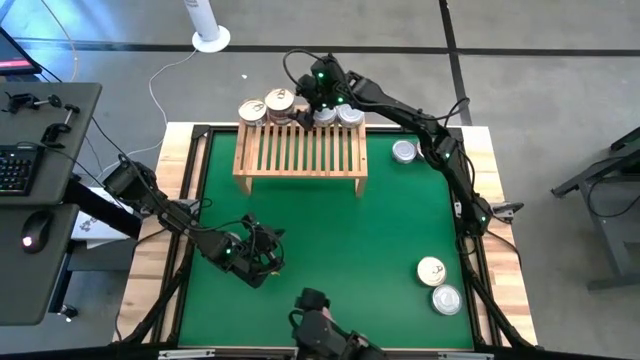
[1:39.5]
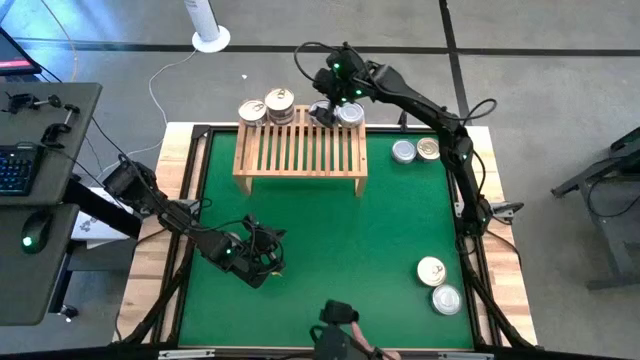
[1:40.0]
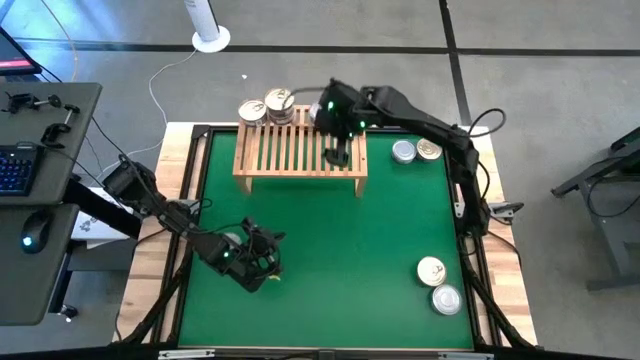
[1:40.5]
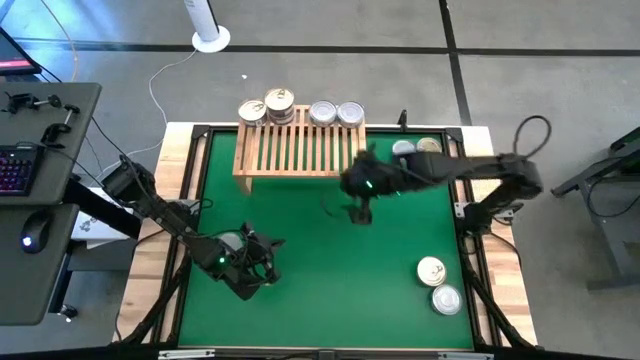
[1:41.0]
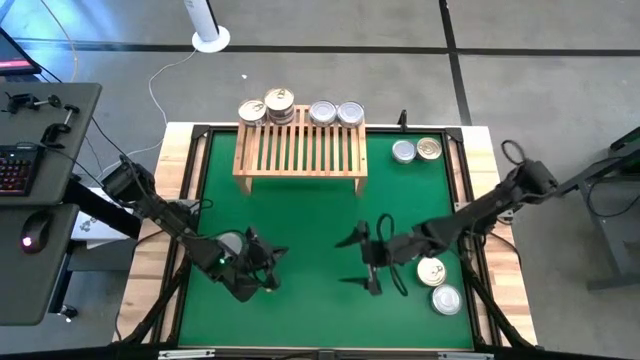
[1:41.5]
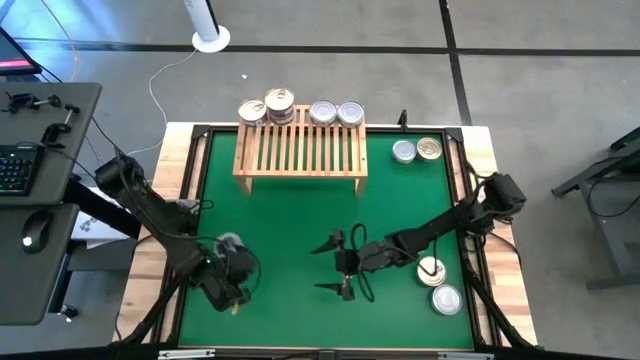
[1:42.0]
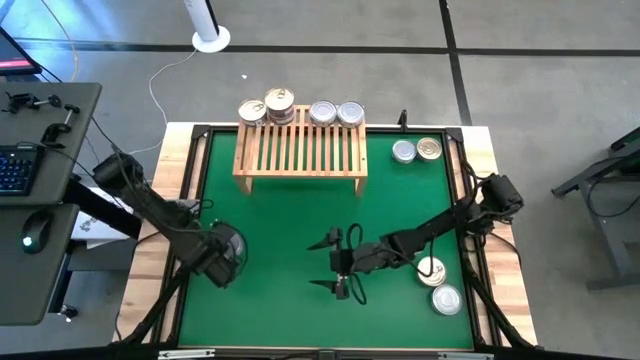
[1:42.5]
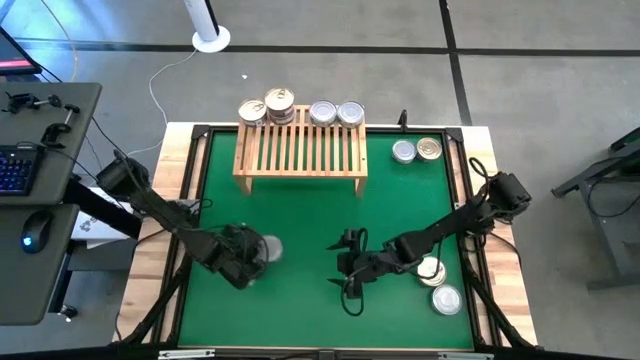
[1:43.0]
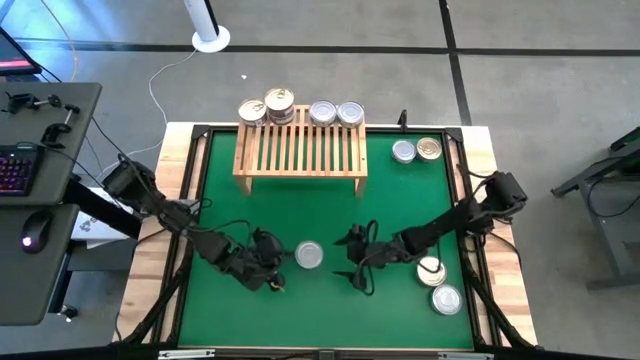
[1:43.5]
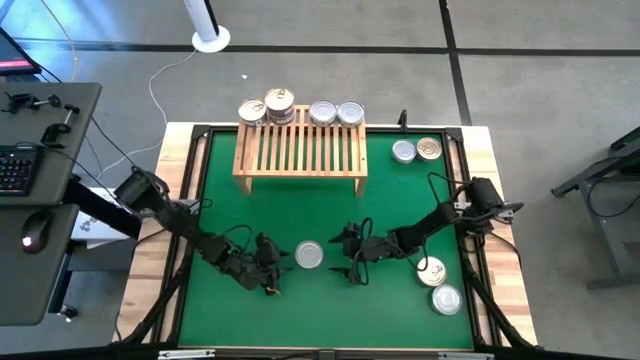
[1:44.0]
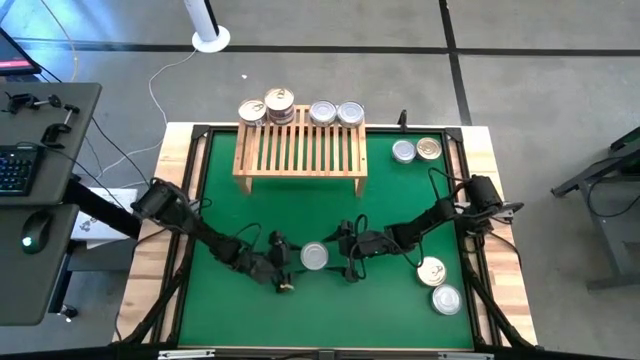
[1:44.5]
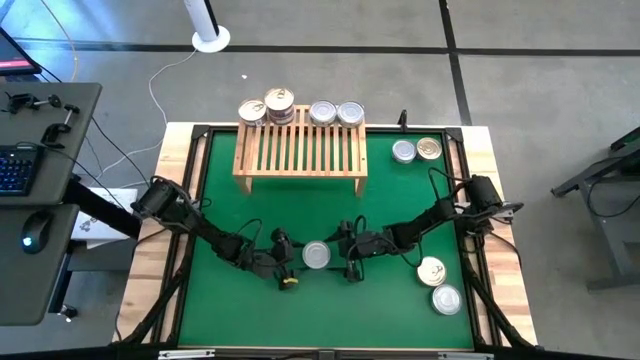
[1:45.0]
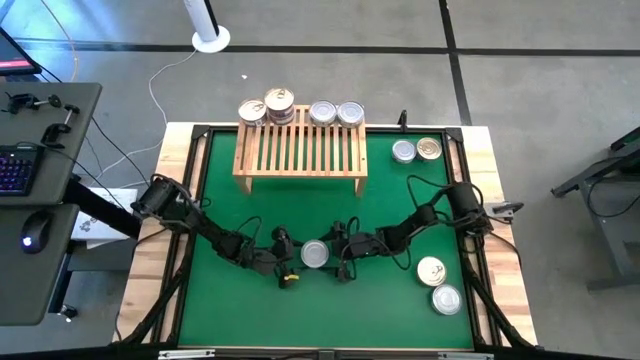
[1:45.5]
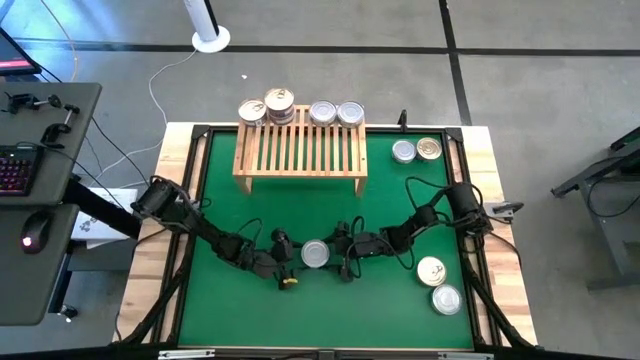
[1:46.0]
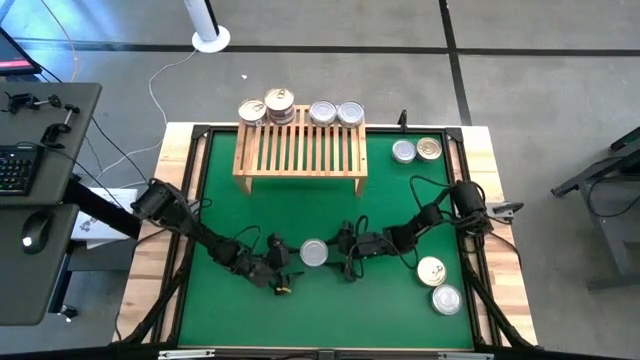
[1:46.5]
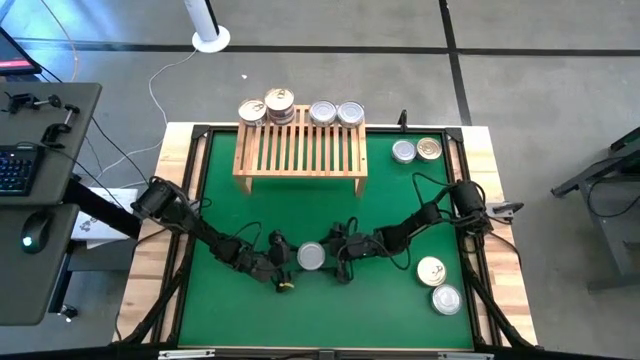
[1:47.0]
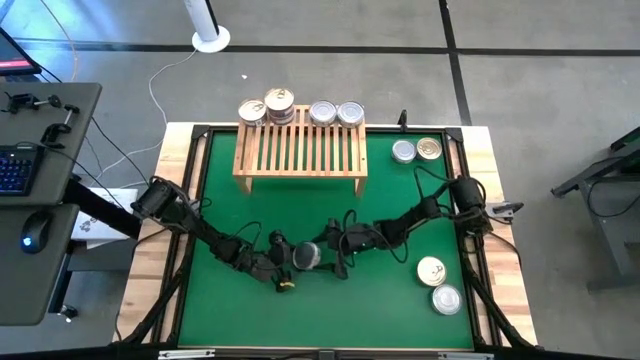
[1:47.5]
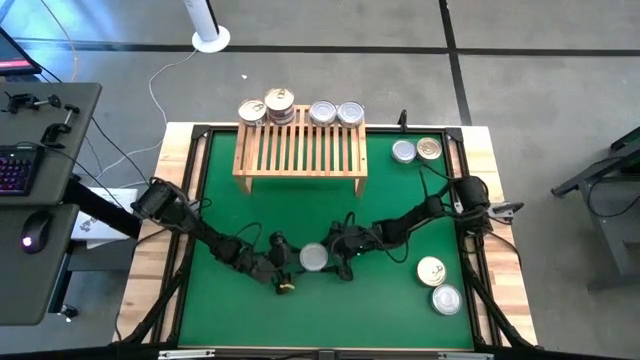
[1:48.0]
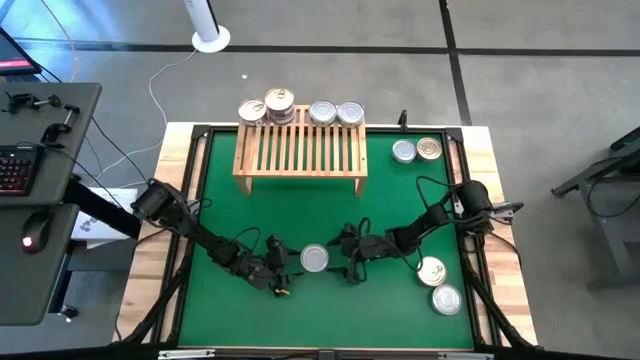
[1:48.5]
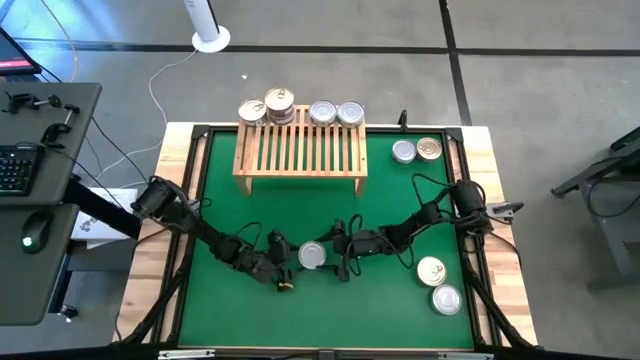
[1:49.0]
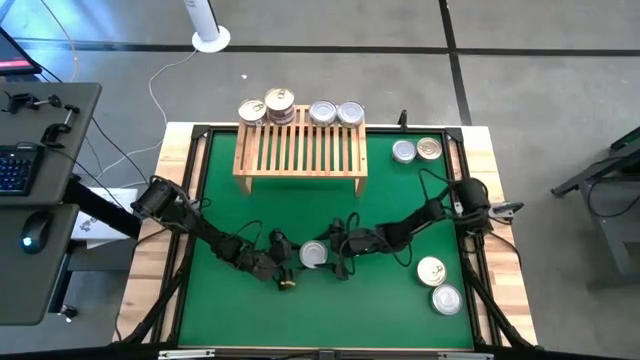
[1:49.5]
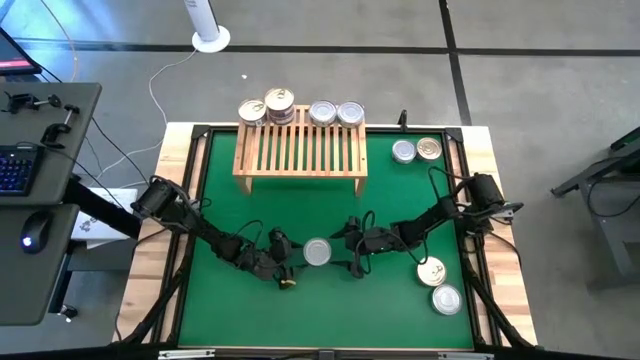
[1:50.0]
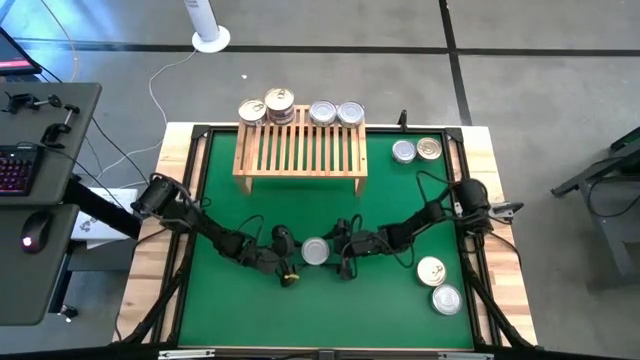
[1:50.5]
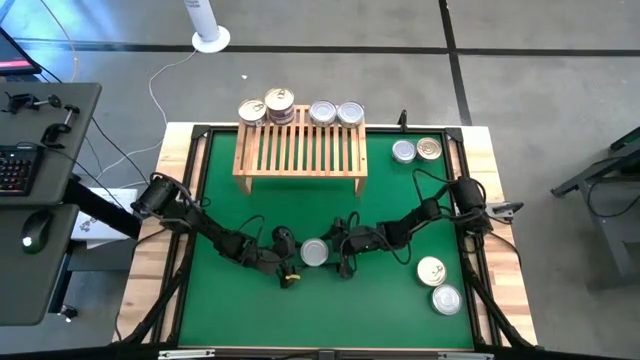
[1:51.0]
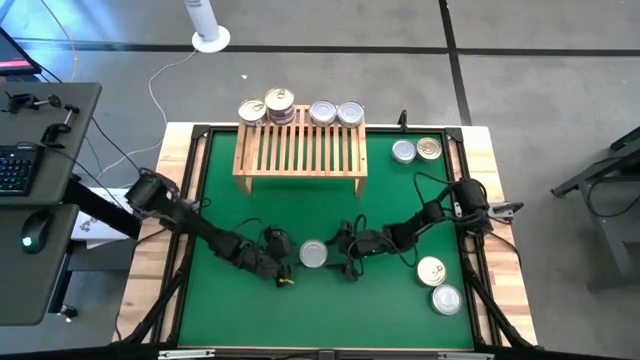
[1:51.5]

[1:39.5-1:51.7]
Task: Stack canned seafood by type on shelf
Stack the green white tuna can on top of the right green white tuna can on the shelf

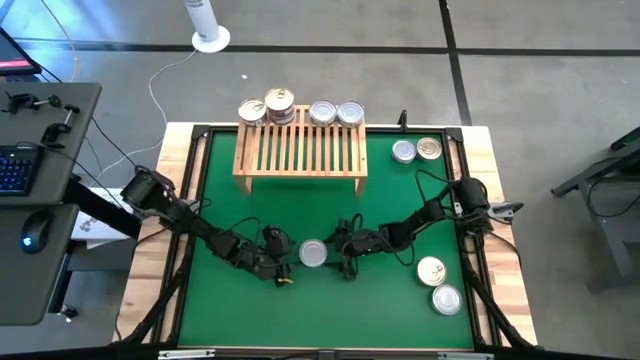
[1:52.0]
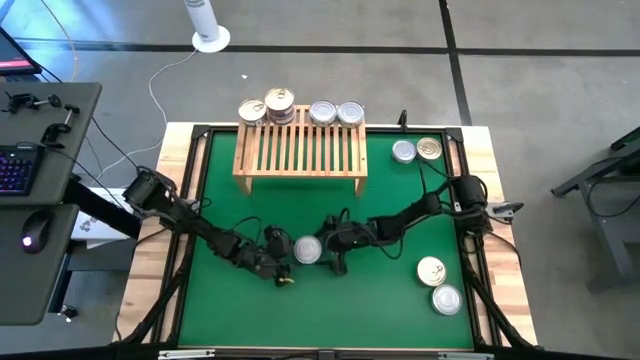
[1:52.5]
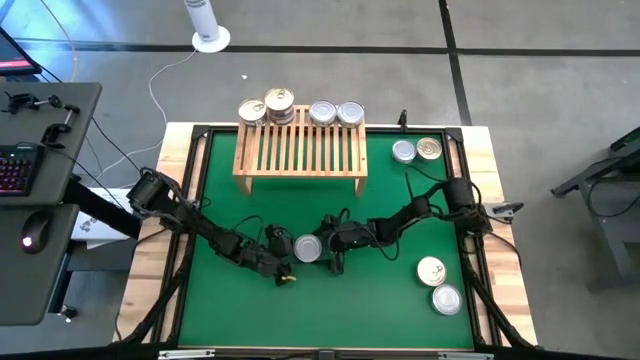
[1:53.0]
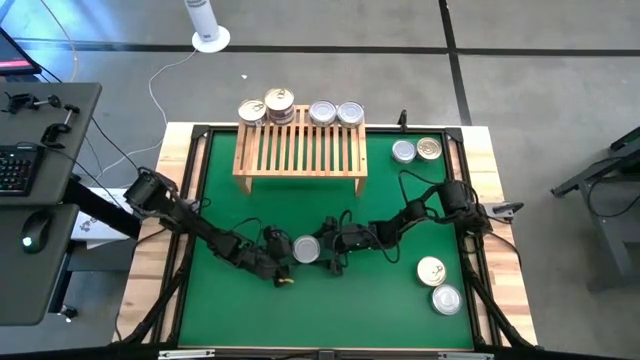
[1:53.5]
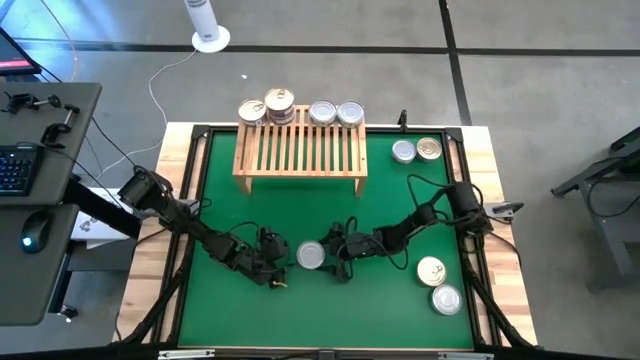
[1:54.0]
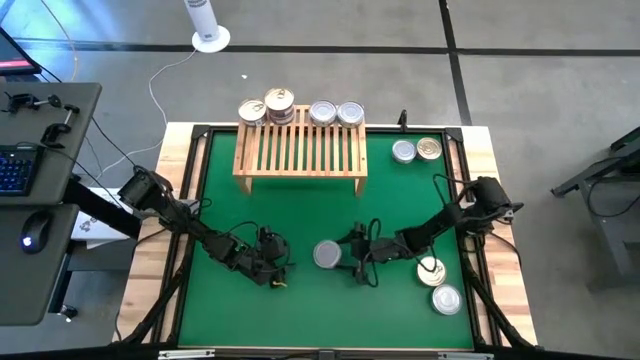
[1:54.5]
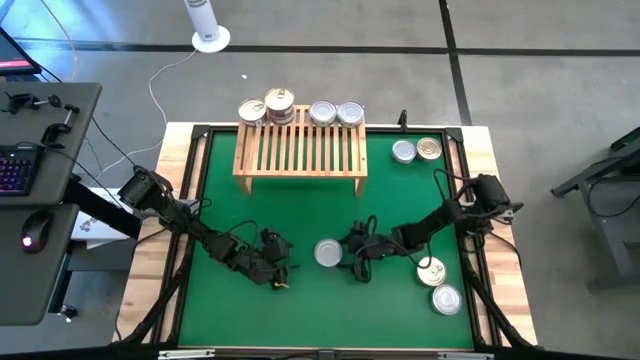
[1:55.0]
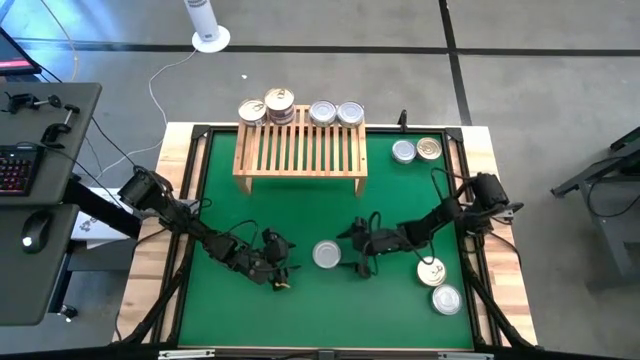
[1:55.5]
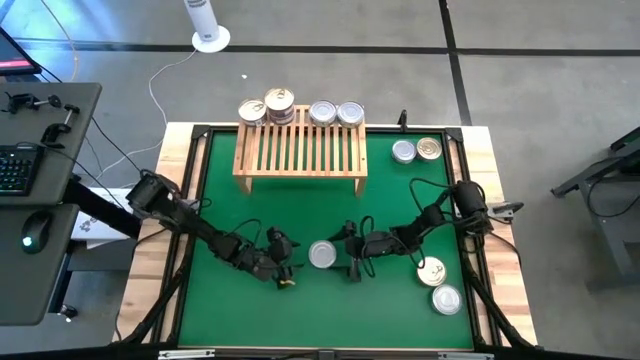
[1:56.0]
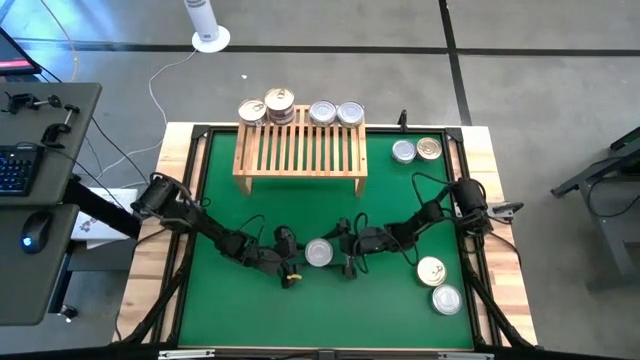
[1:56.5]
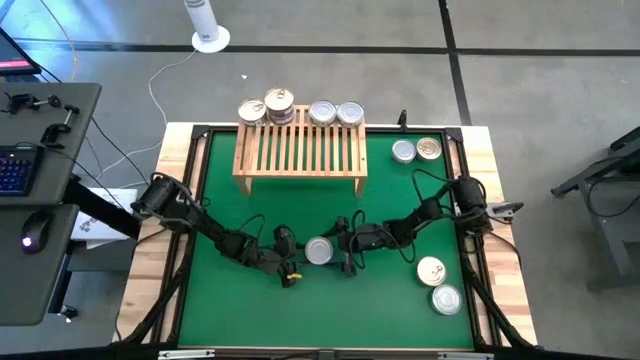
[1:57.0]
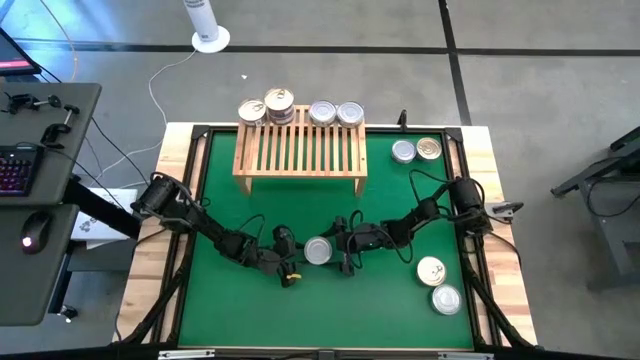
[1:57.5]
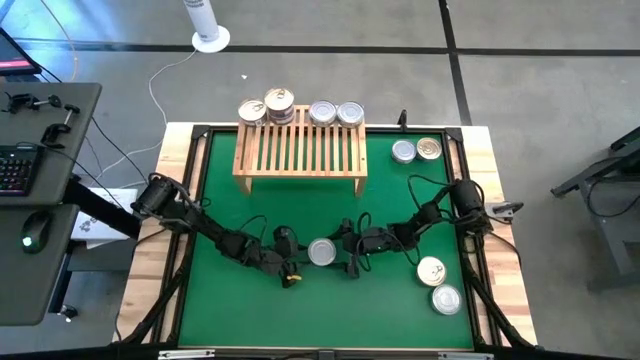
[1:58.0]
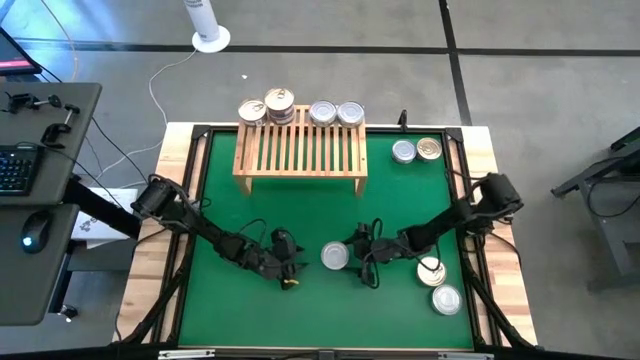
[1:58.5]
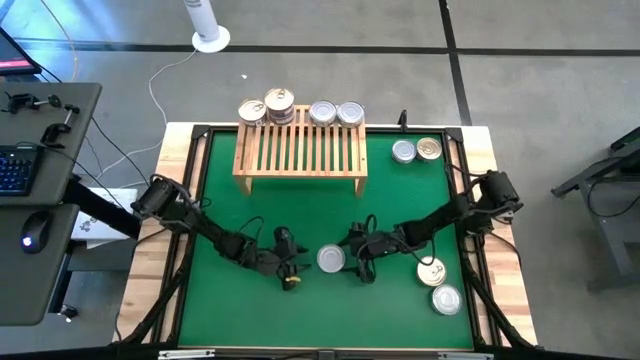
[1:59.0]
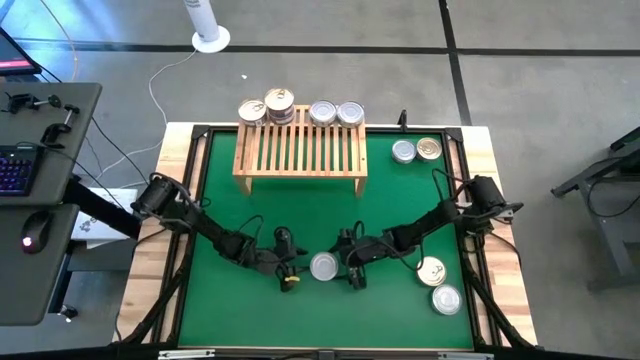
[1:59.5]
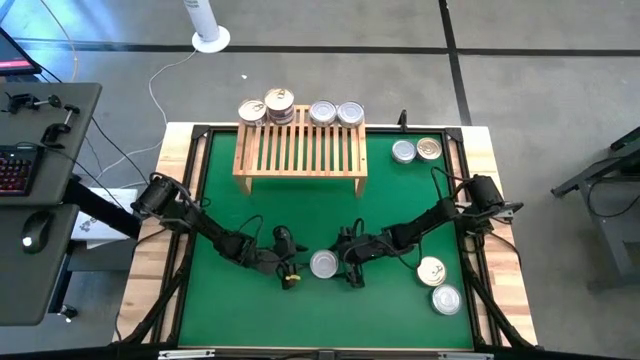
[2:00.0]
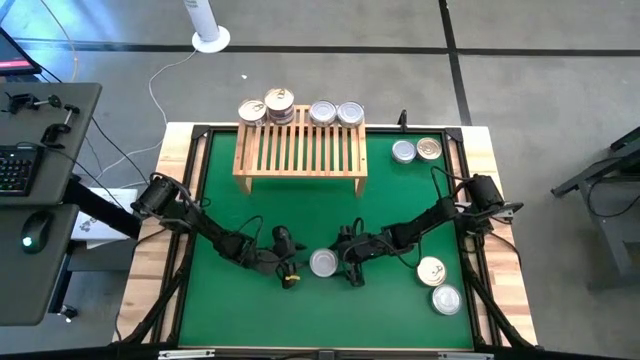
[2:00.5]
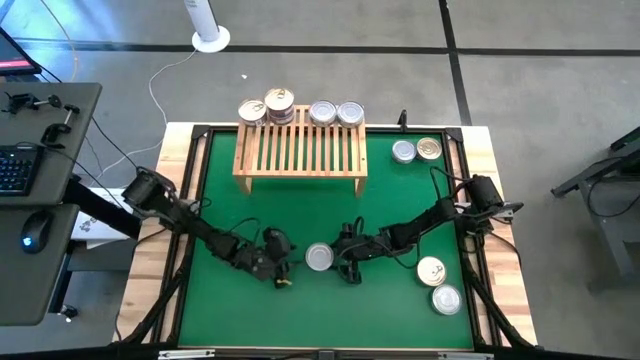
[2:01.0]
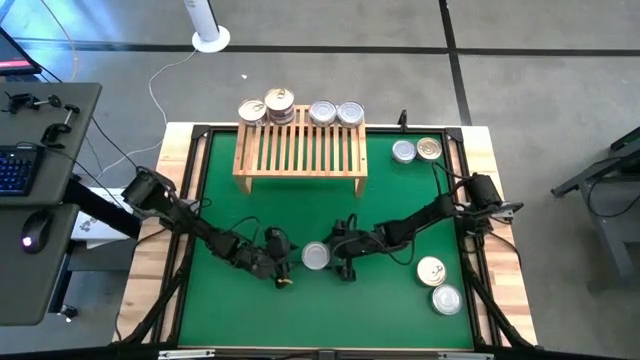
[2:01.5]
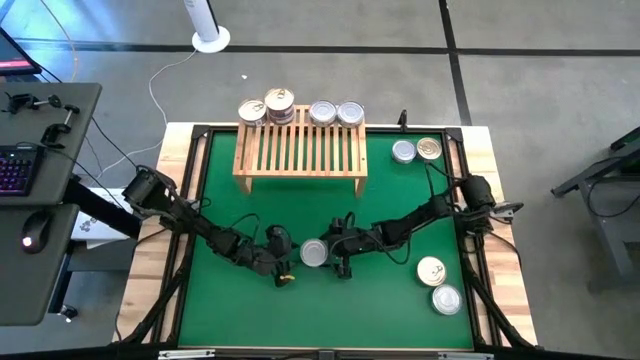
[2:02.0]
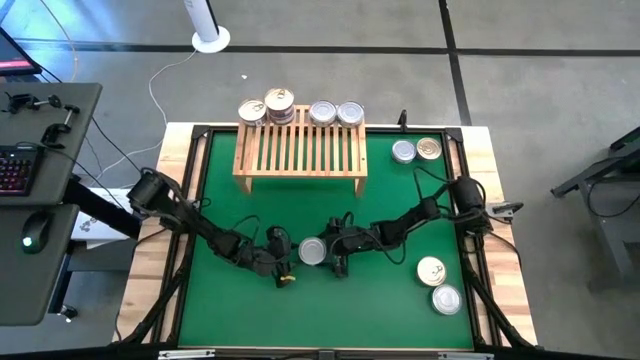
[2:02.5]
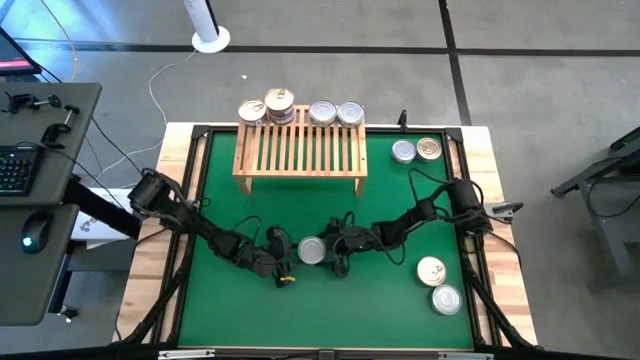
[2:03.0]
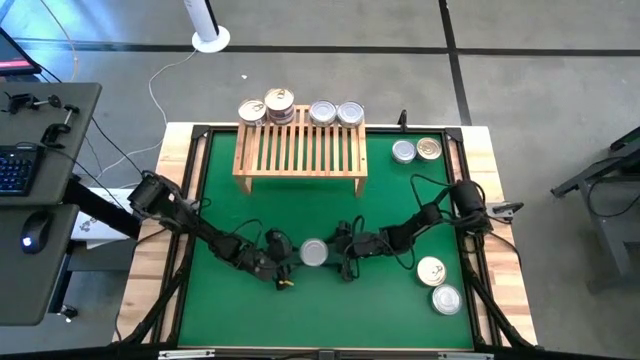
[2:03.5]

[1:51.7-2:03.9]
Stack the green white tuna can on top of the right green white tuna can on the shelf
